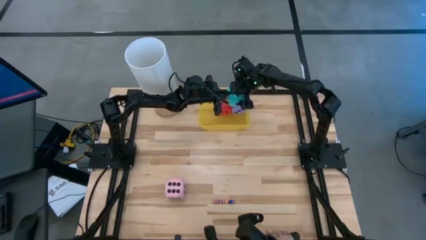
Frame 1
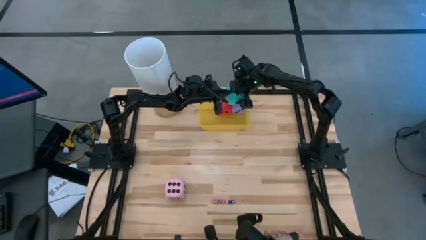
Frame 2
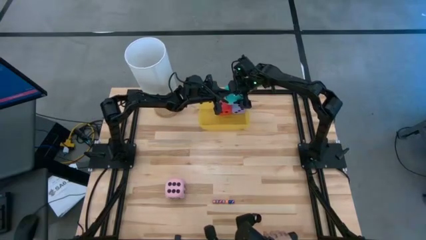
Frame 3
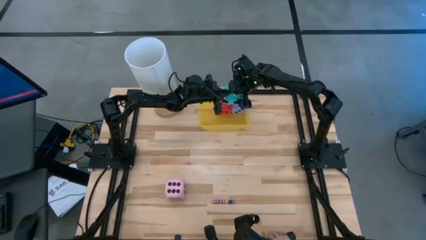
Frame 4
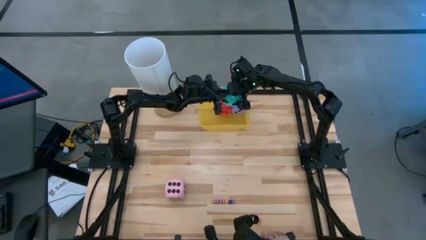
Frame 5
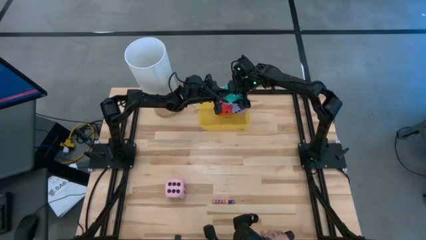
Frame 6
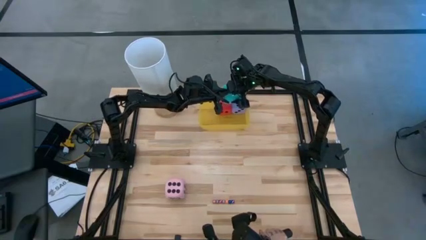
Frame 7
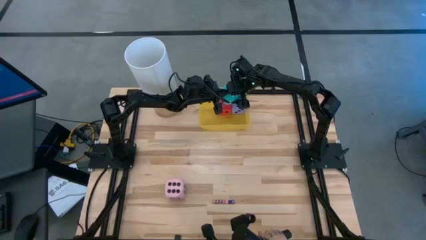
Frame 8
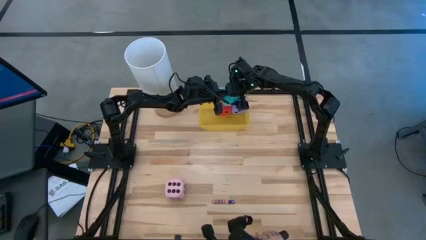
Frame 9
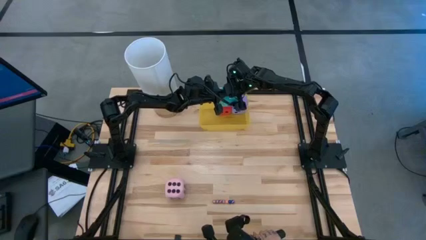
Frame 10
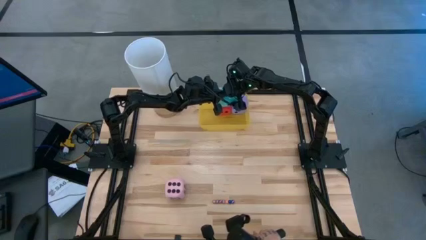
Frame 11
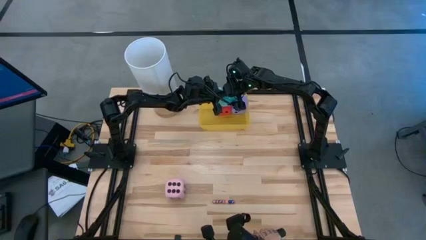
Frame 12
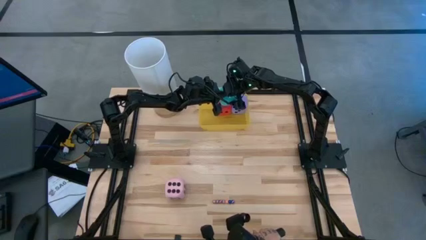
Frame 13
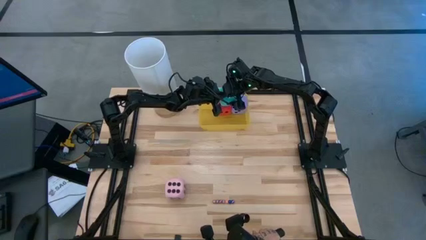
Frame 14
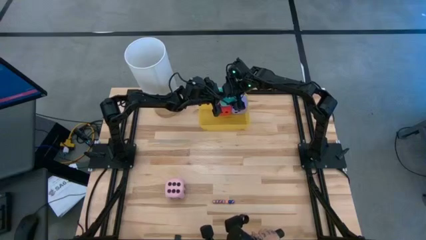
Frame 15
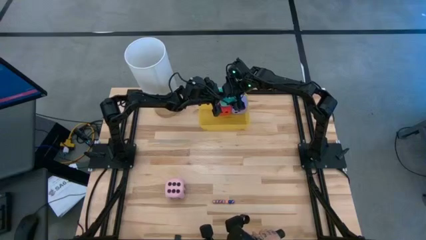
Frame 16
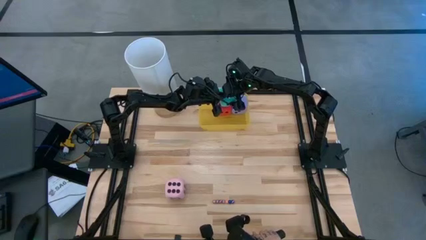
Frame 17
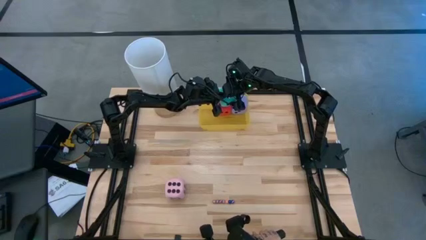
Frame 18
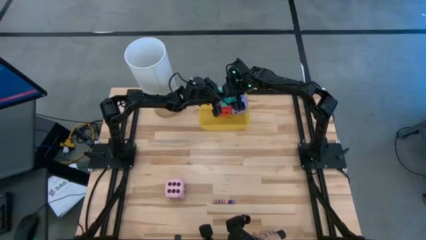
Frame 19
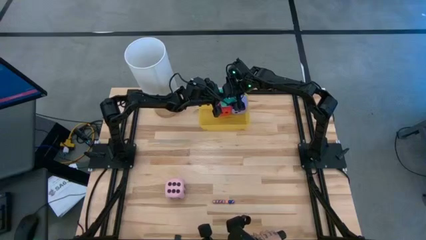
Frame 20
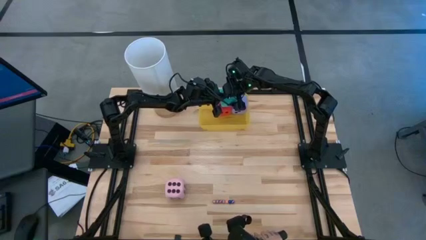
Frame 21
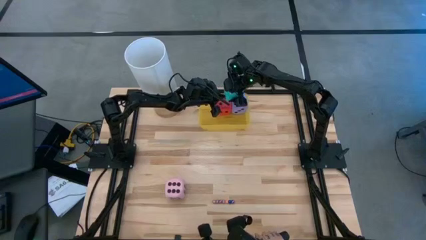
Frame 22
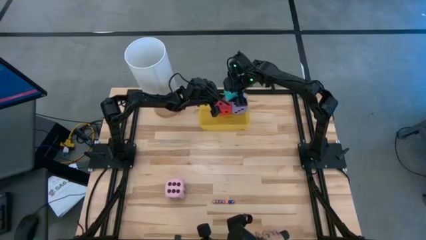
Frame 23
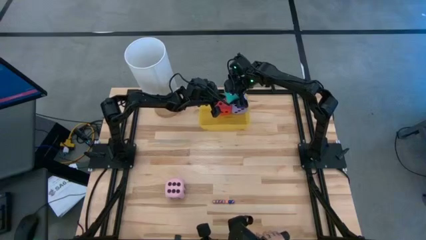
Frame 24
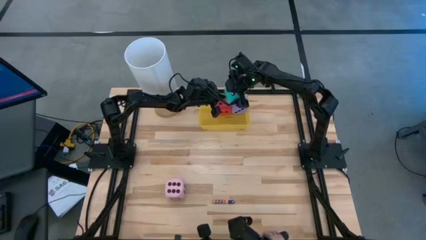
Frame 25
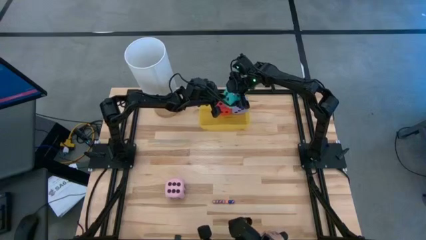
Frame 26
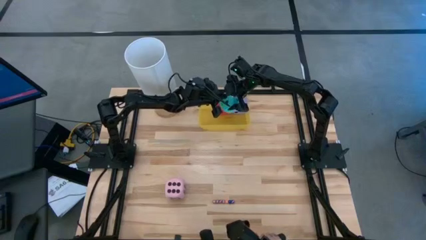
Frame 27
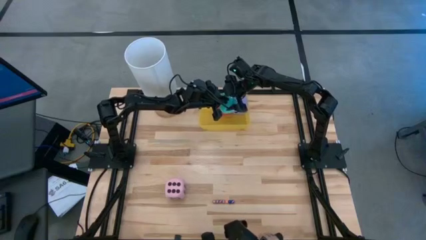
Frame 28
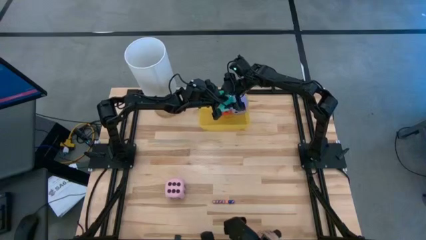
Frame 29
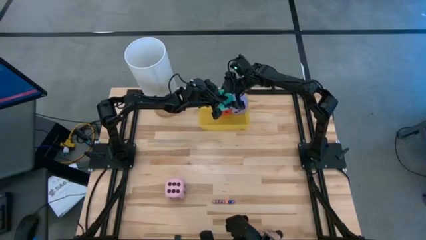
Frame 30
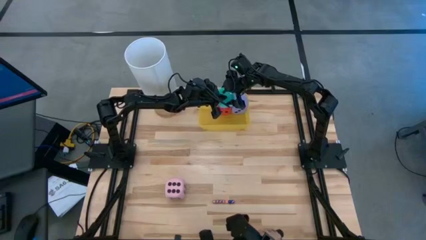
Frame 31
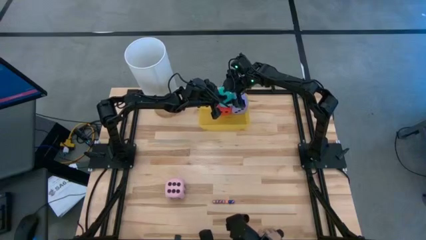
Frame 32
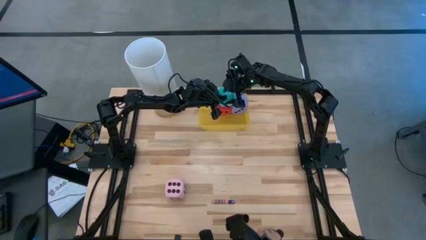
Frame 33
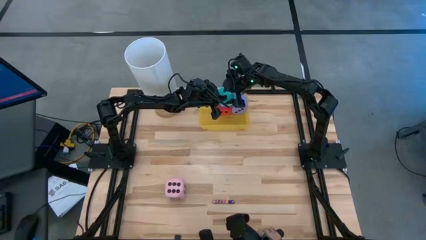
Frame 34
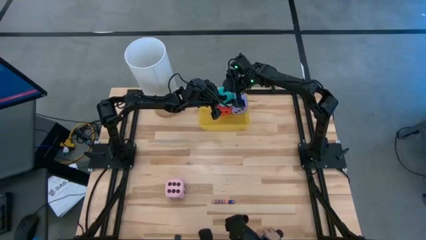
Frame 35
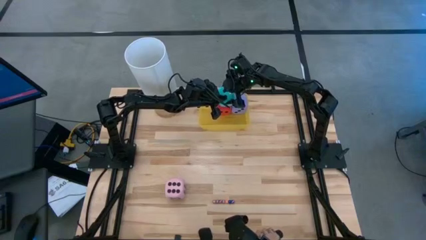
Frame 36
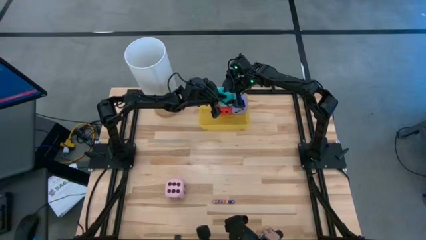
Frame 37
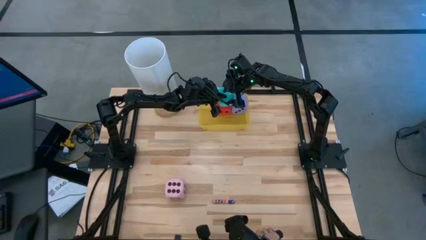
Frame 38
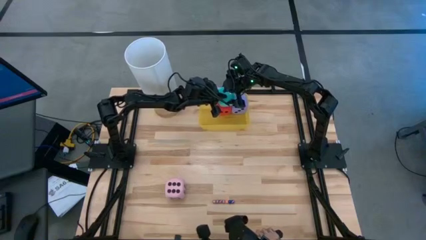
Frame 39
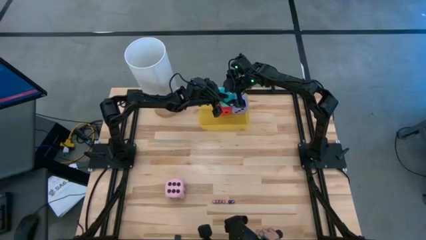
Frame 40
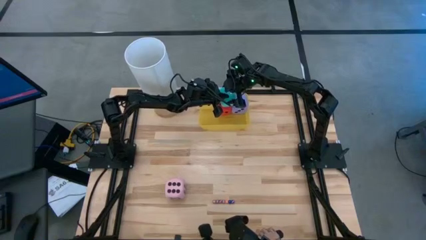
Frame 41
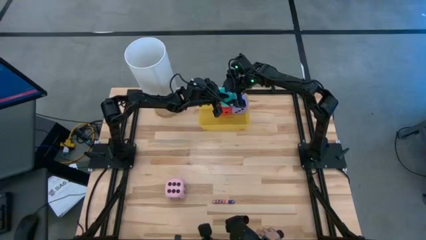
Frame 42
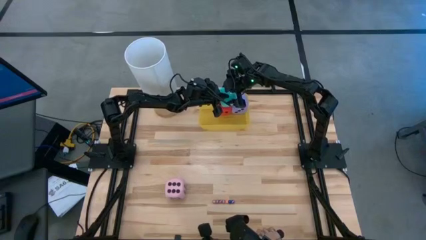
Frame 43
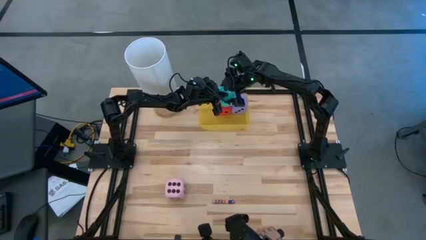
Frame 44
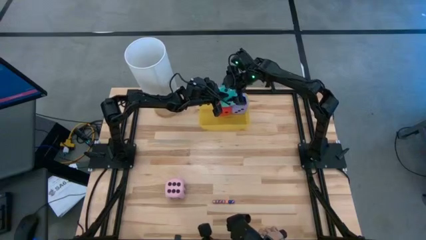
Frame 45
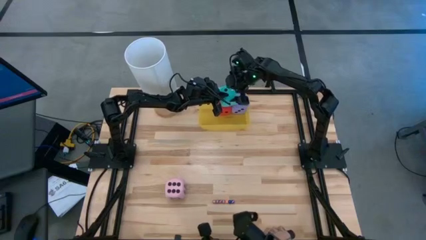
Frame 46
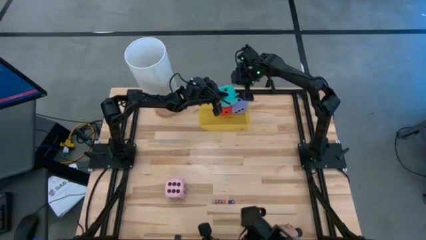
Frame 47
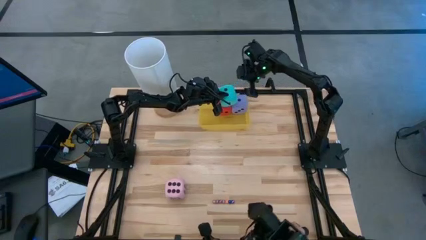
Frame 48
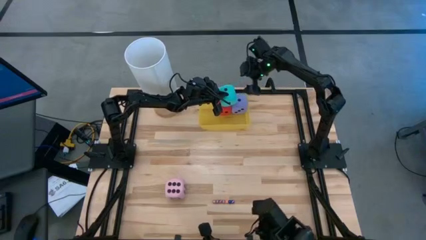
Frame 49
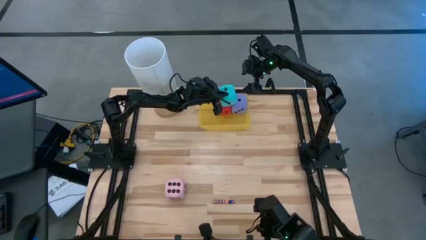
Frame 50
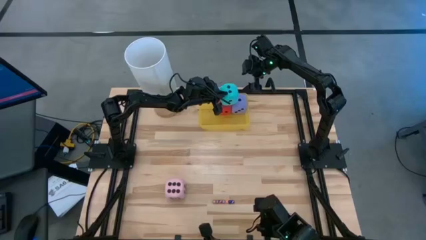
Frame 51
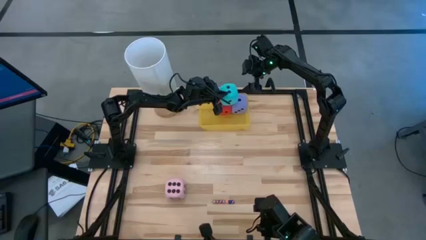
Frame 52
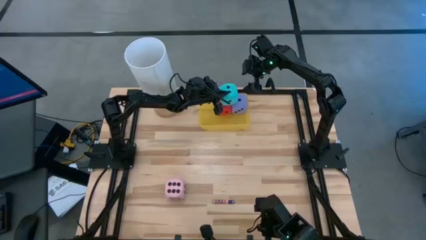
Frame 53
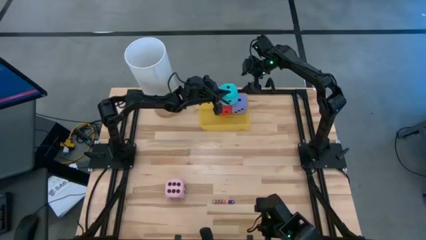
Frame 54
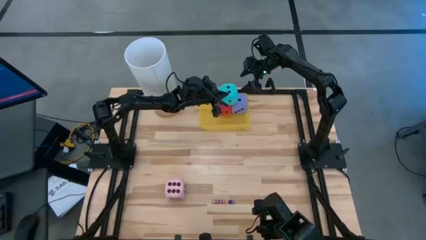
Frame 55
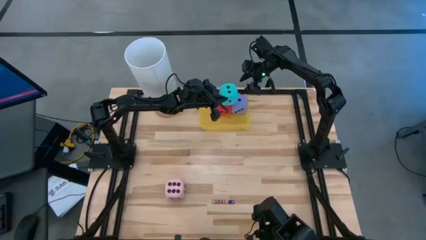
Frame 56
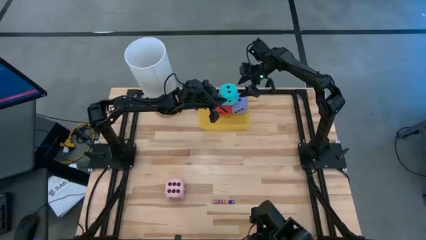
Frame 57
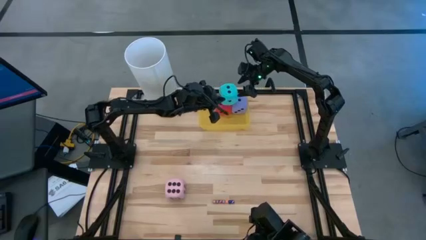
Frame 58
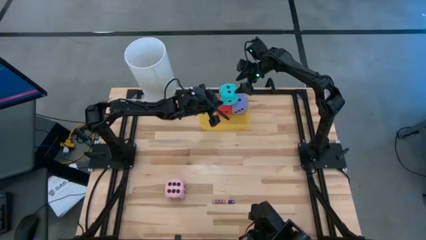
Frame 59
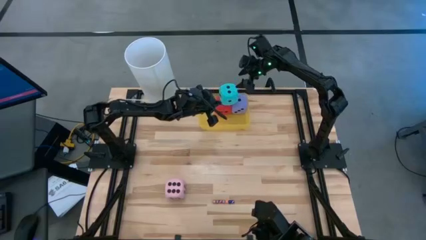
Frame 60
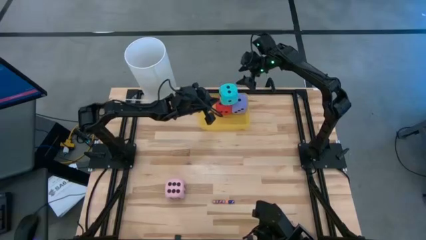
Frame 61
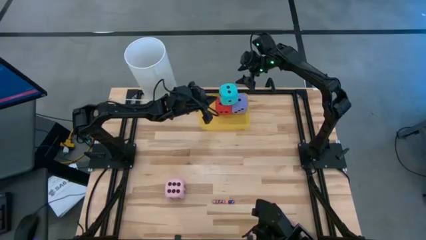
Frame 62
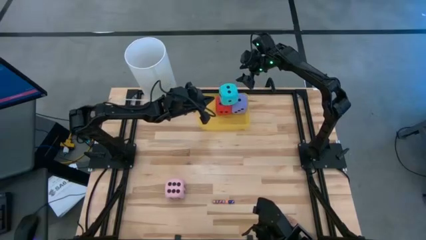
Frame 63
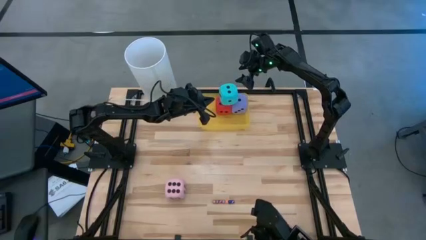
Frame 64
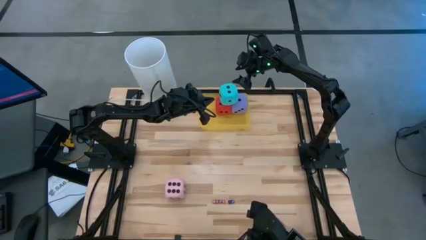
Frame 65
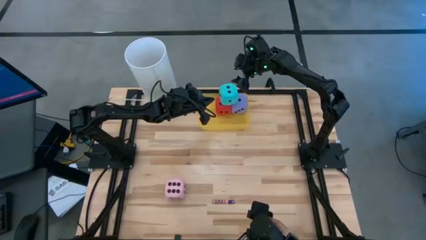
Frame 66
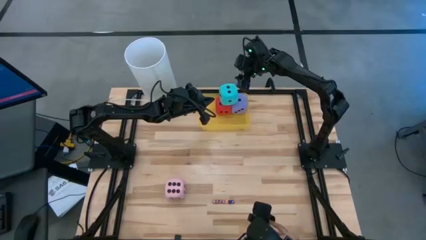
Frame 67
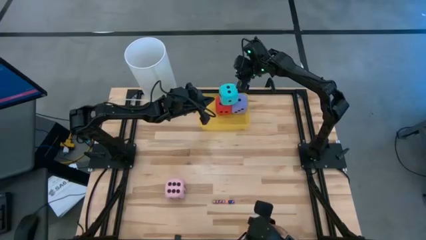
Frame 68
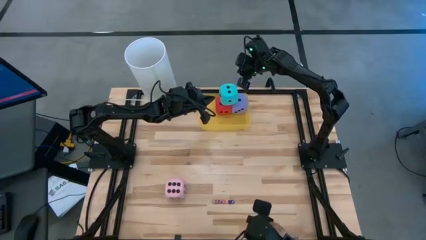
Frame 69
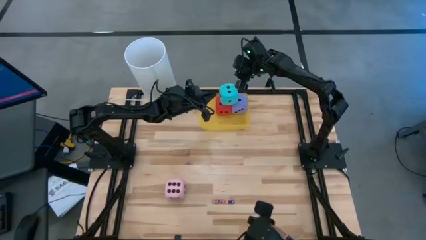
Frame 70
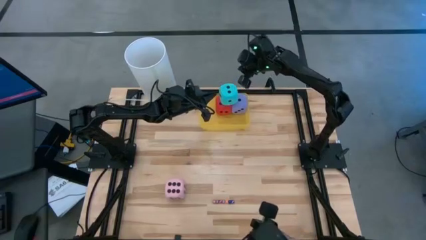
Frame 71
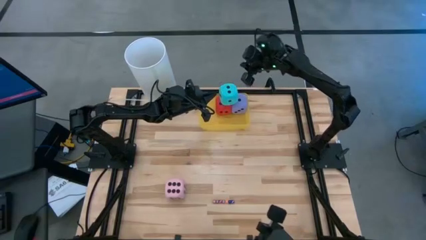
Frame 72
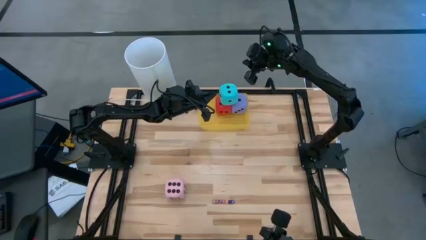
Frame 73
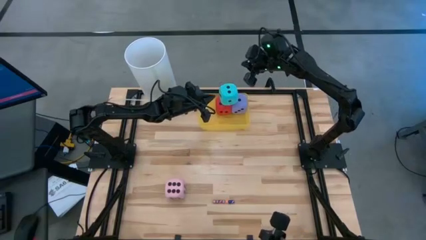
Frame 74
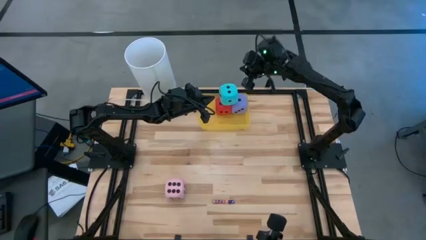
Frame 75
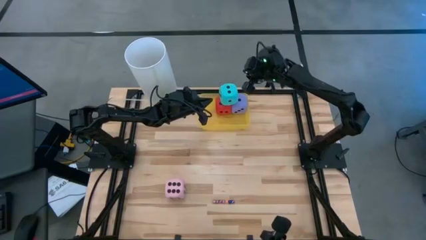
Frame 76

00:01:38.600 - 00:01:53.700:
Task: Pick & Place Dice
Put the big light blue dice into the yellow bin
